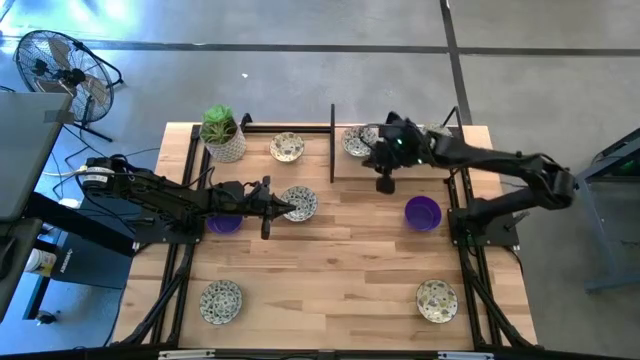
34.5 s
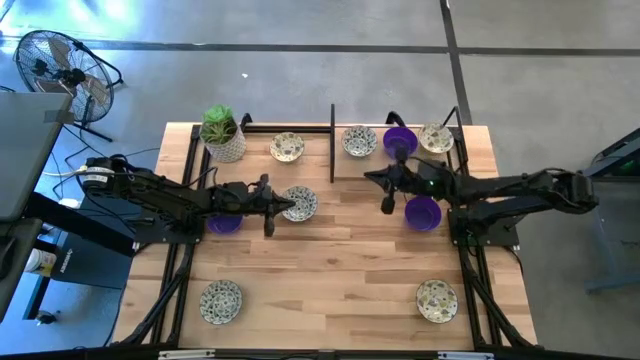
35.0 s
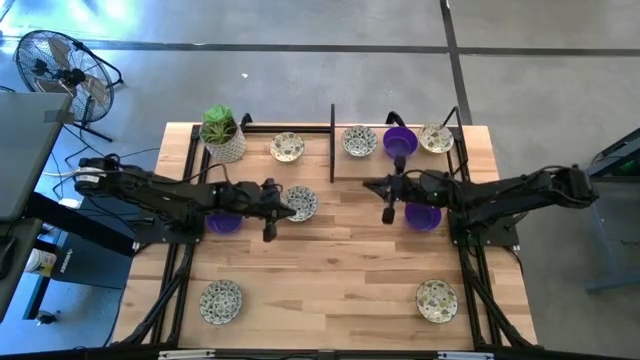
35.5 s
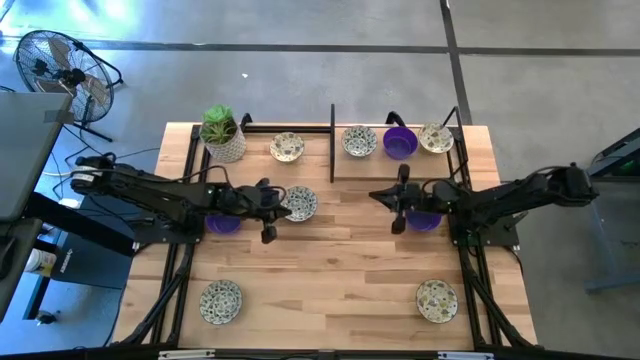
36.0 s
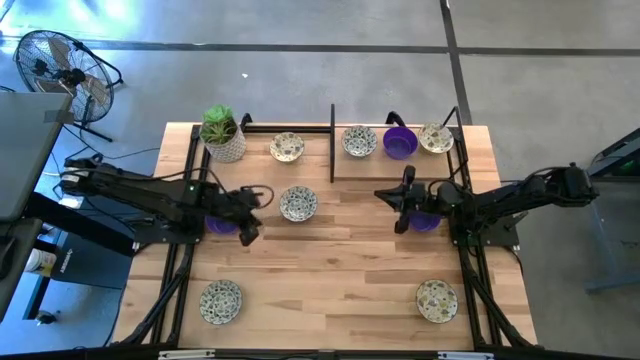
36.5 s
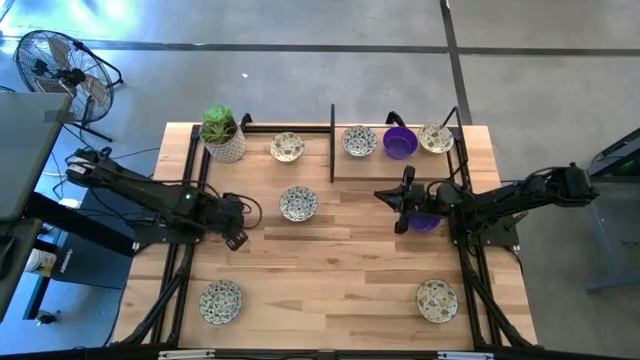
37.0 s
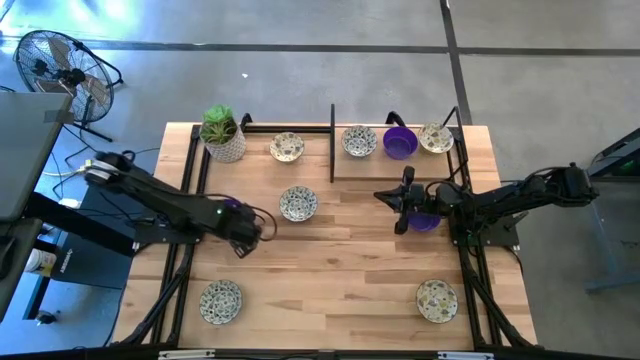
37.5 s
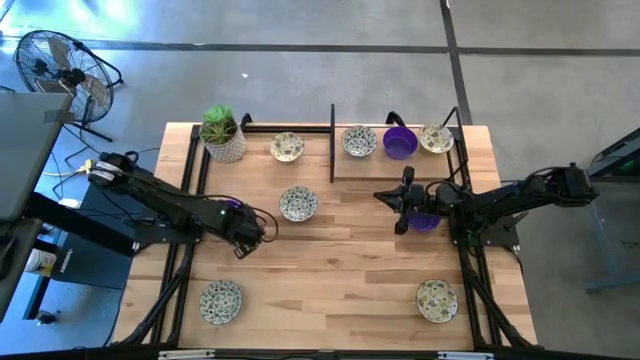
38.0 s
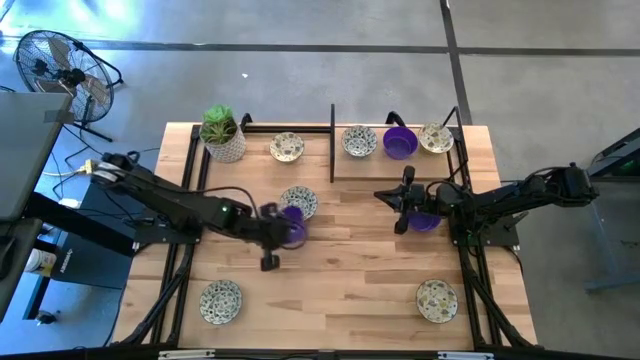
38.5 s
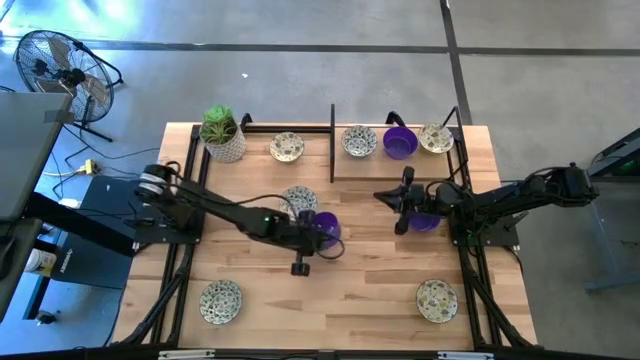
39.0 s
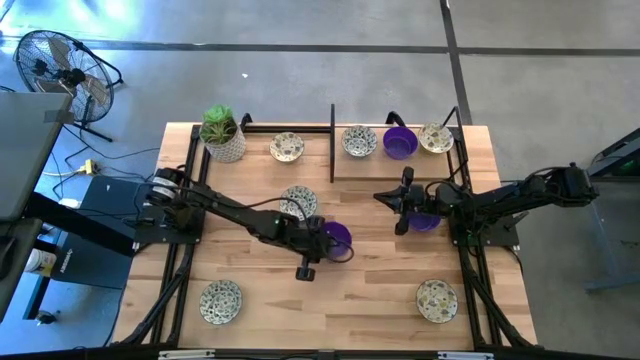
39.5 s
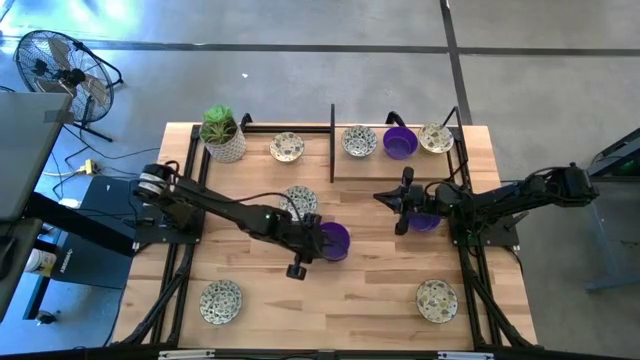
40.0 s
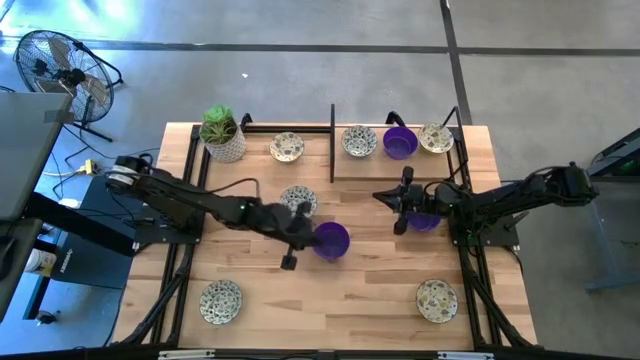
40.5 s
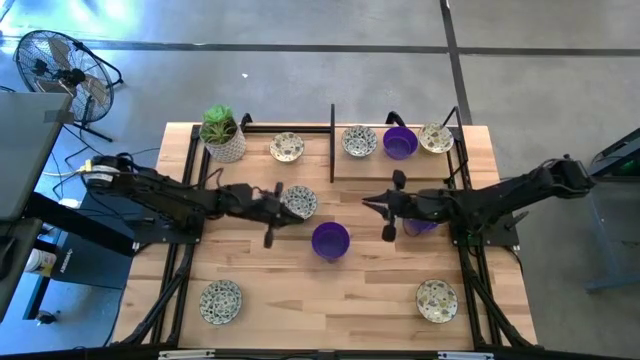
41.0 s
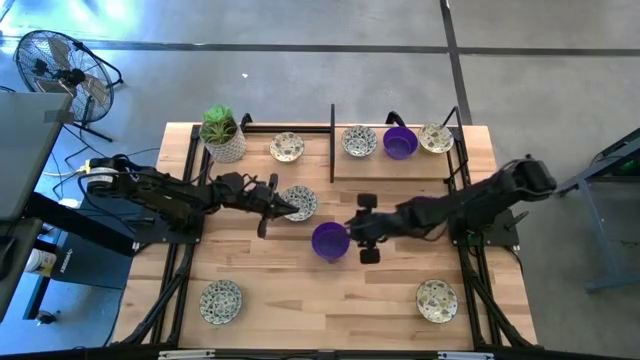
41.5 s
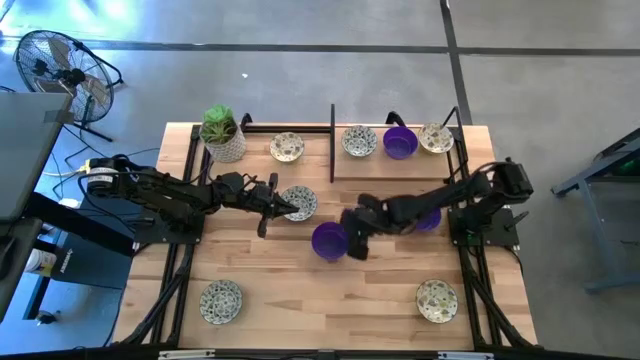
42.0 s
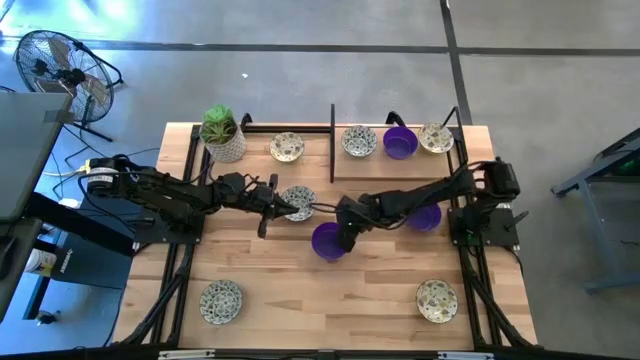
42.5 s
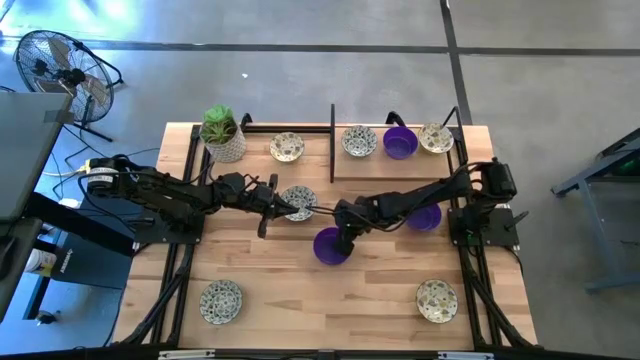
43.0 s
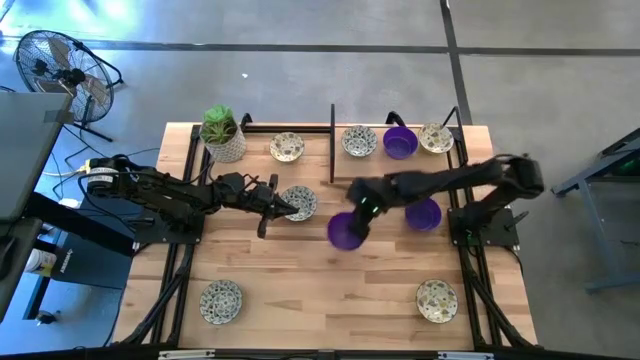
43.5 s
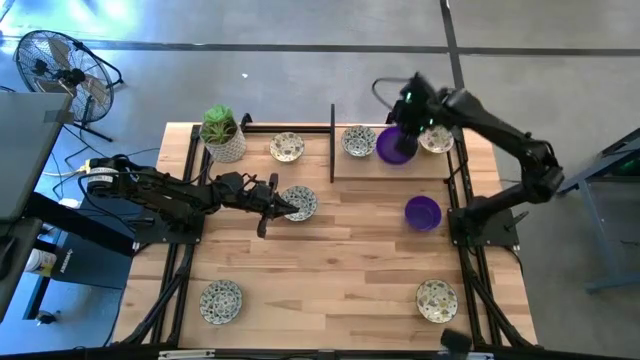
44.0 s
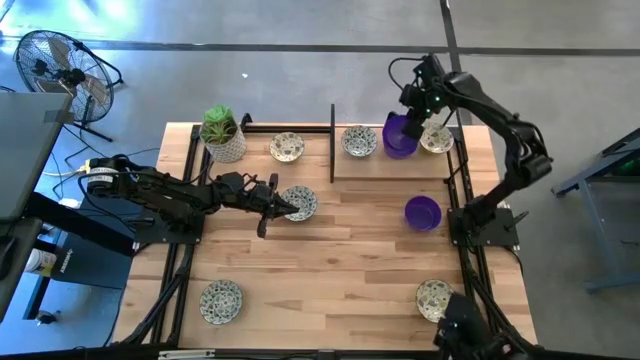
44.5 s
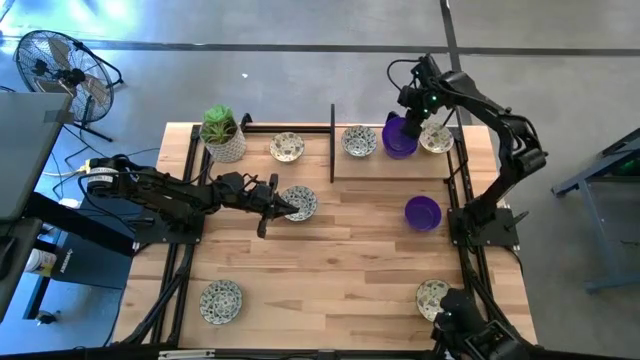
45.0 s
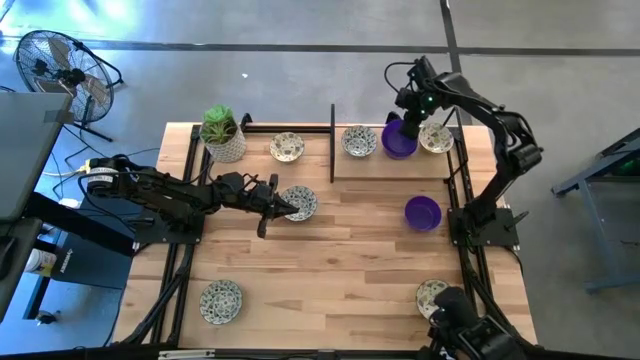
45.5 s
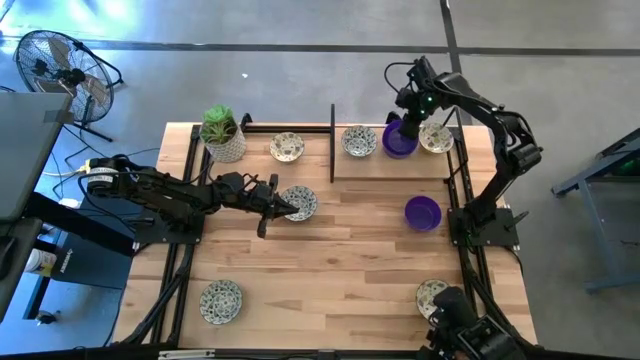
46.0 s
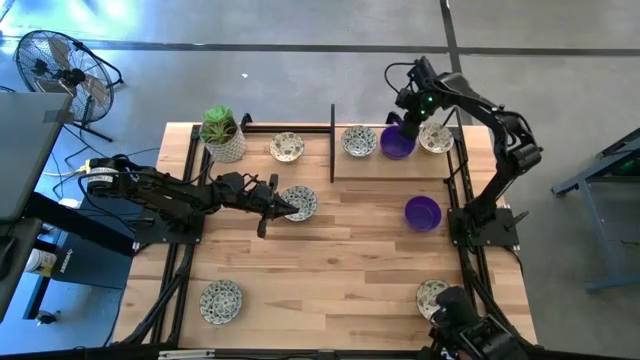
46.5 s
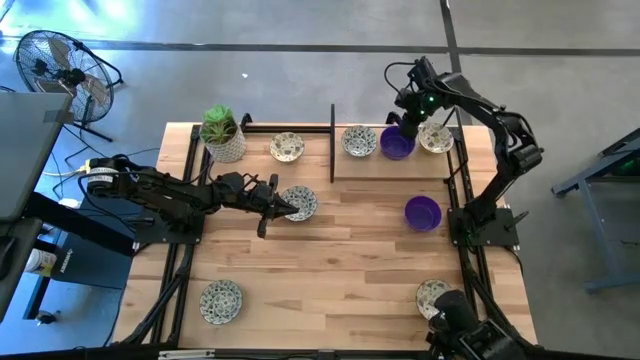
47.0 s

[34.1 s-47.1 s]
Task: Pick & Place Mini bowls
Stack the left blue bowl on top of the blue bowl on the shelf

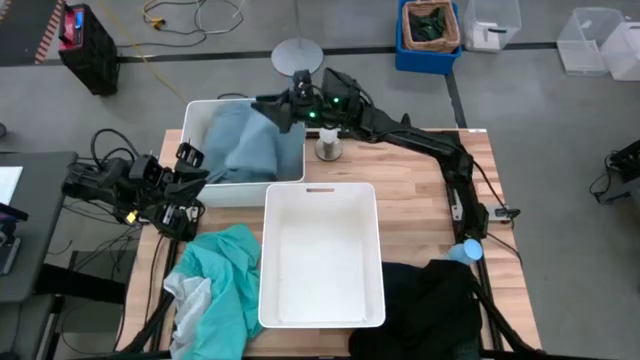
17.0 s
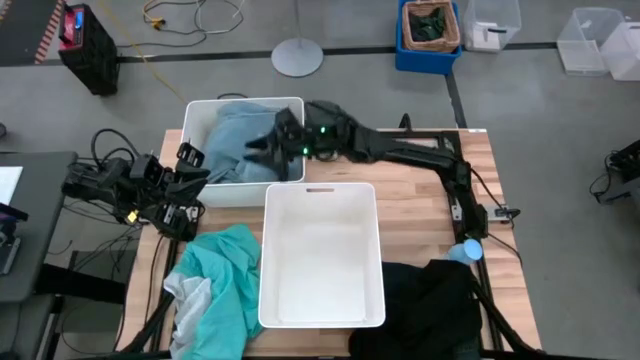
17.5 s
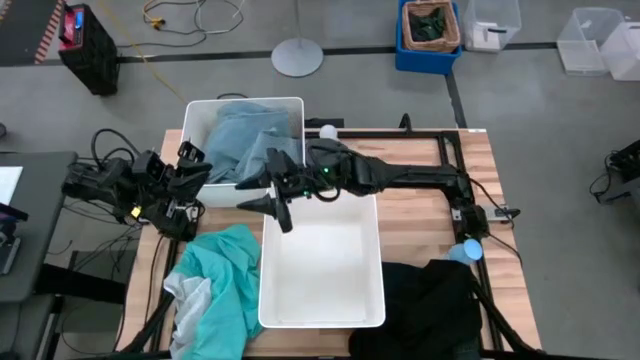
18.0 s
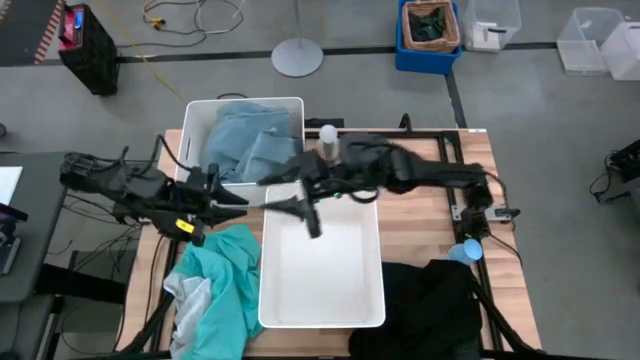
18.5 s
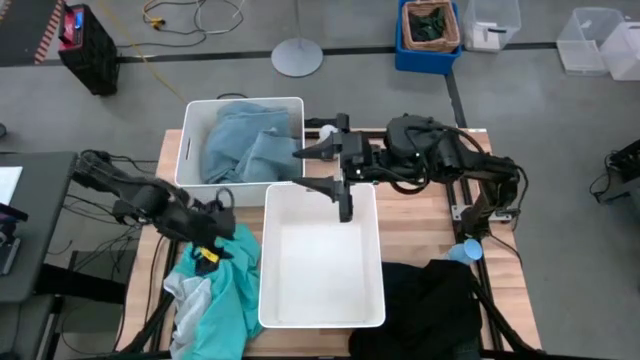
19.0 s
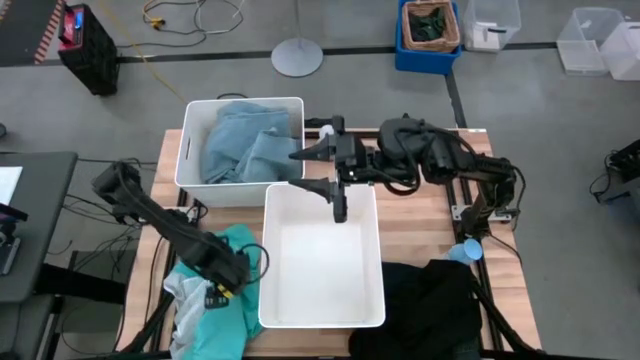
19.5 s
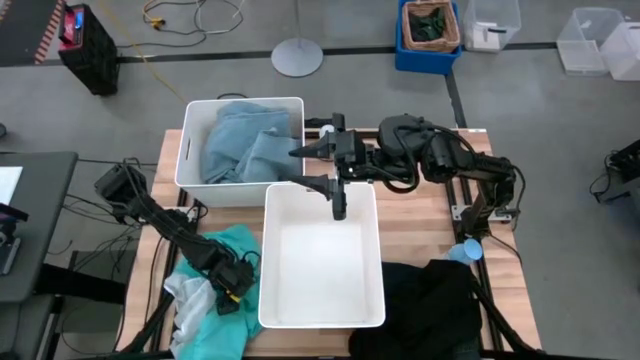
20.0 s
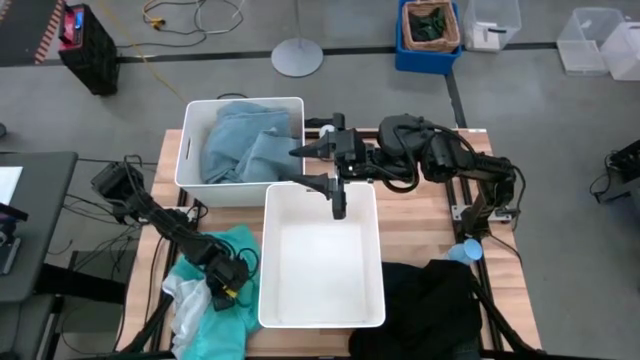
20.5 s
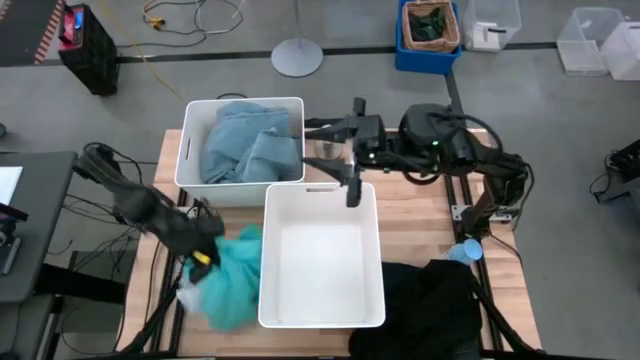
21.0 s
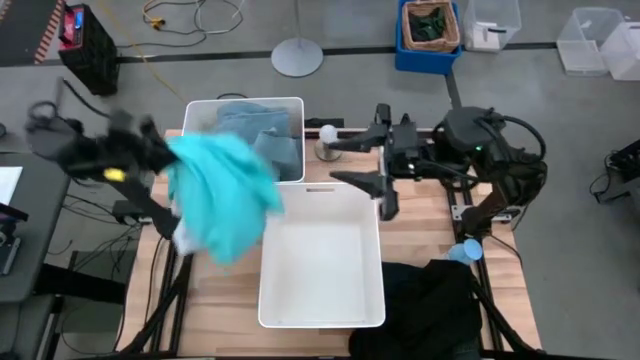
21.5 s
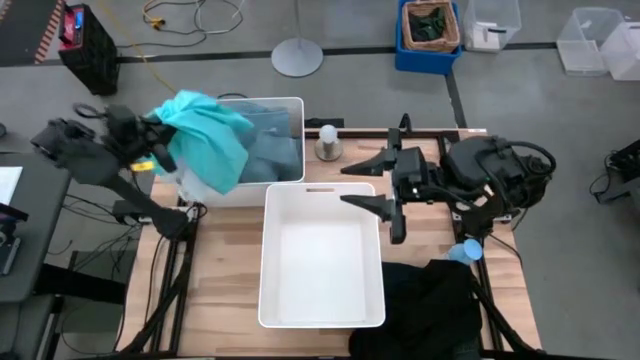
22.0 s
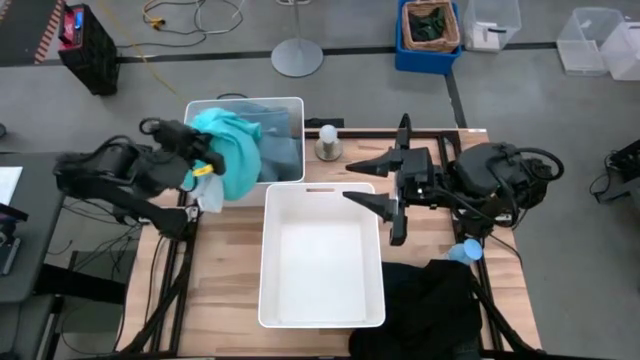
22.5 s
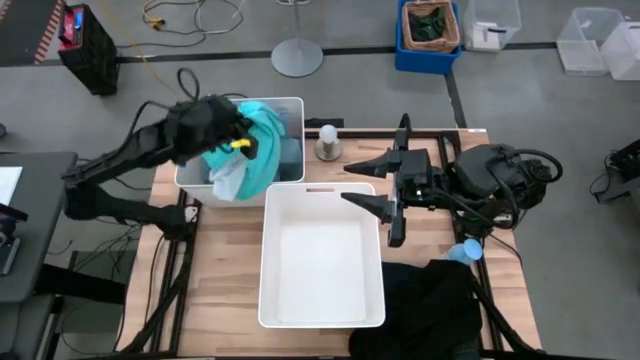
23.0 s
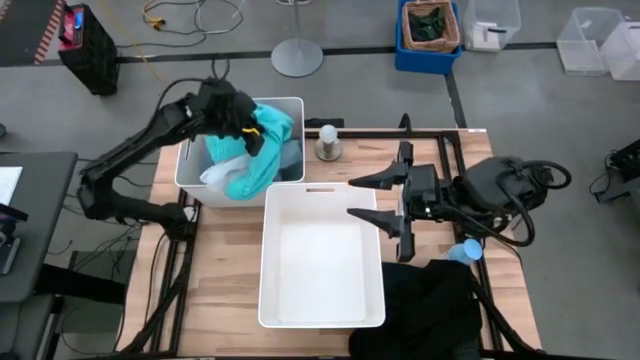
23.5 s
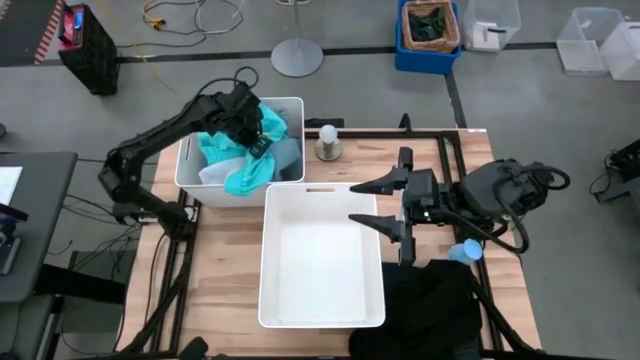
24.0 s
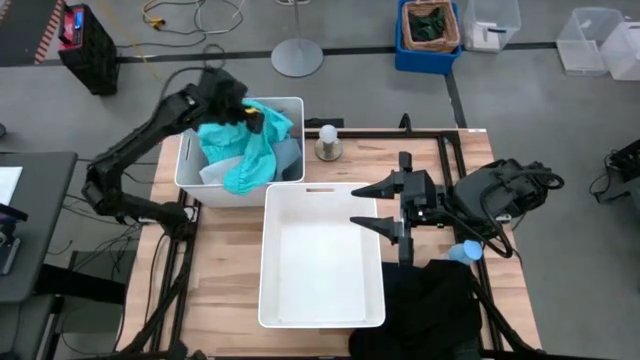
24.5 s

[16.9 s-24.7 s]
Task: Sort clothes
Put light blue shorts into the top white bin
